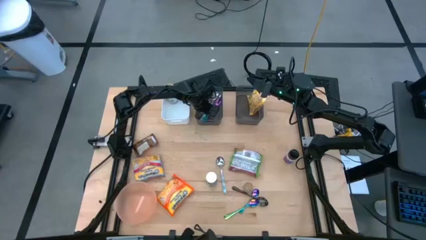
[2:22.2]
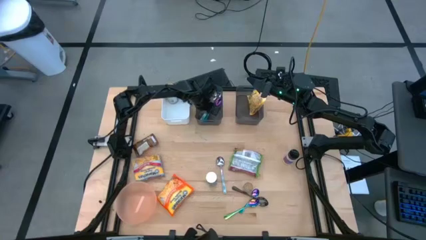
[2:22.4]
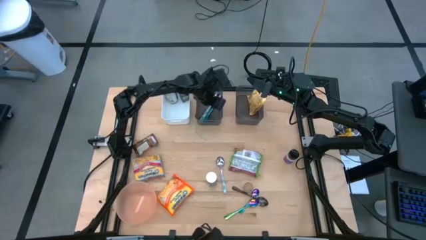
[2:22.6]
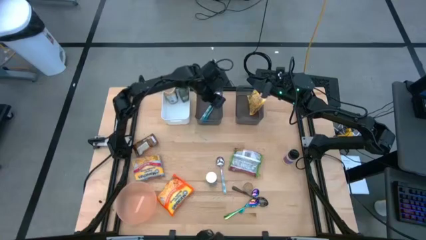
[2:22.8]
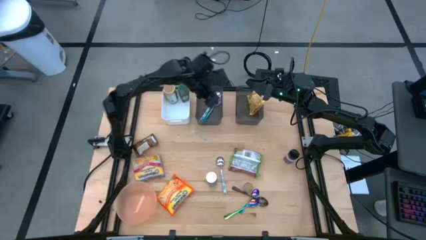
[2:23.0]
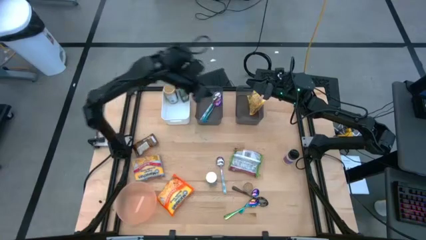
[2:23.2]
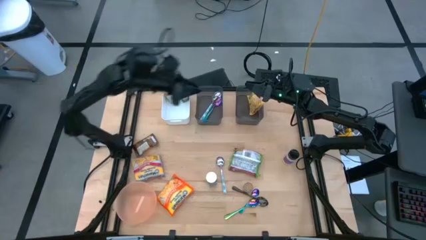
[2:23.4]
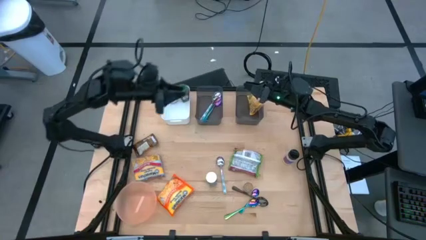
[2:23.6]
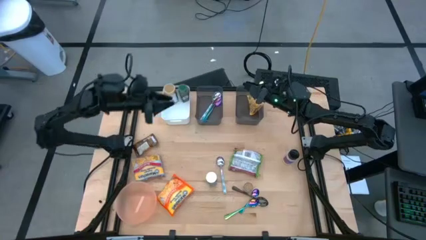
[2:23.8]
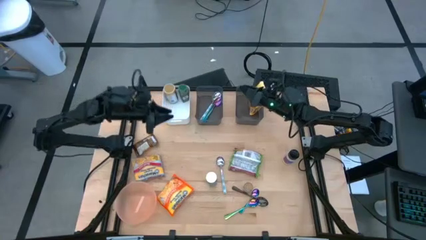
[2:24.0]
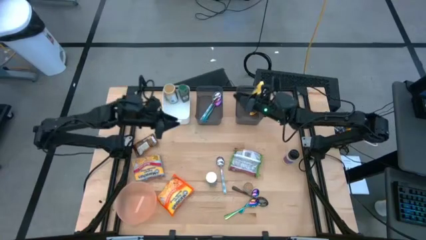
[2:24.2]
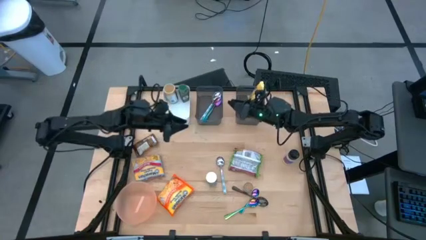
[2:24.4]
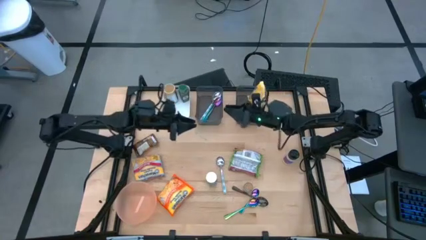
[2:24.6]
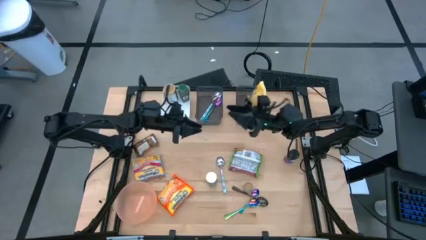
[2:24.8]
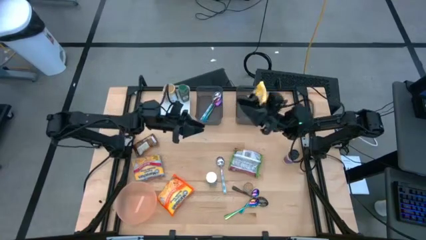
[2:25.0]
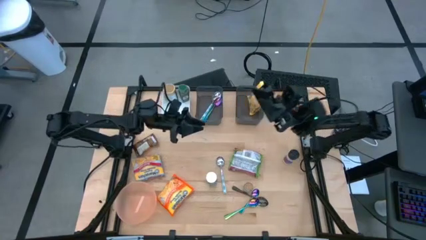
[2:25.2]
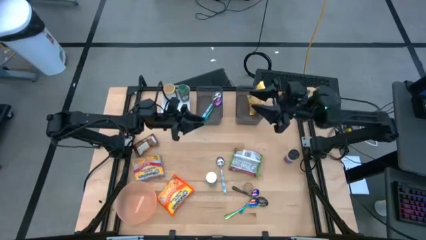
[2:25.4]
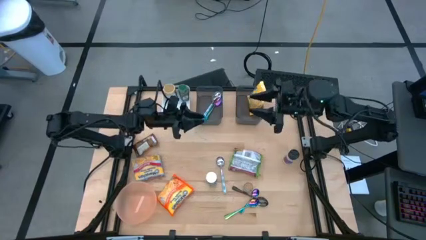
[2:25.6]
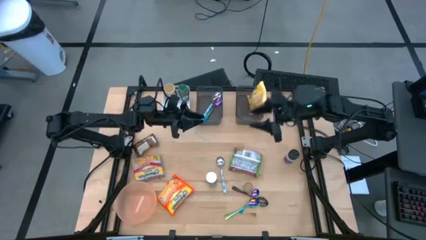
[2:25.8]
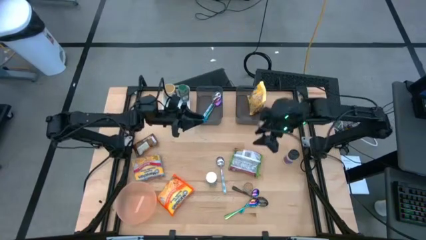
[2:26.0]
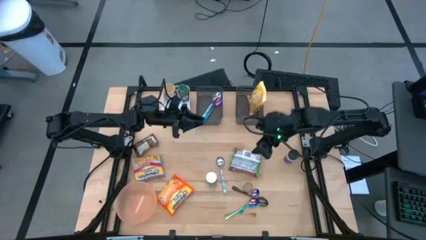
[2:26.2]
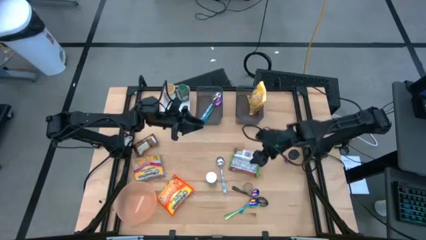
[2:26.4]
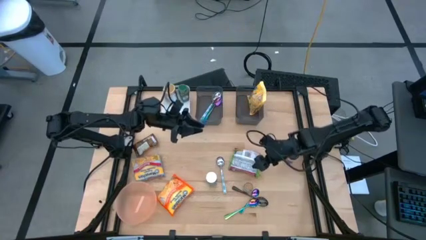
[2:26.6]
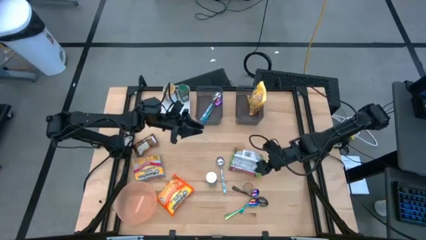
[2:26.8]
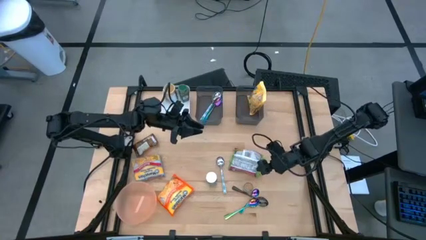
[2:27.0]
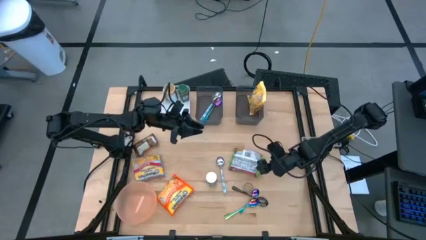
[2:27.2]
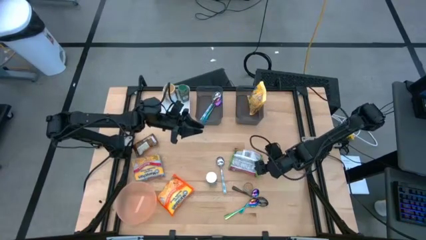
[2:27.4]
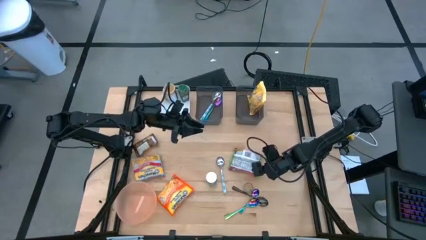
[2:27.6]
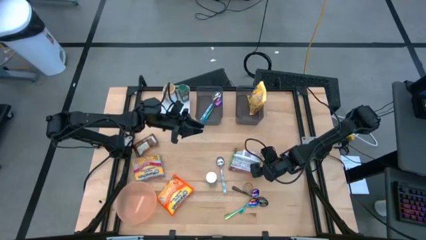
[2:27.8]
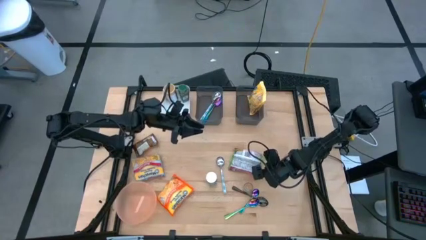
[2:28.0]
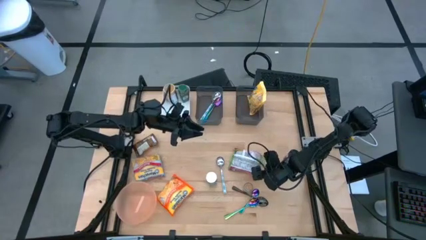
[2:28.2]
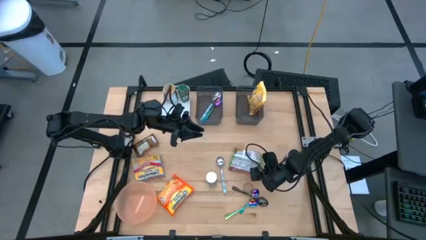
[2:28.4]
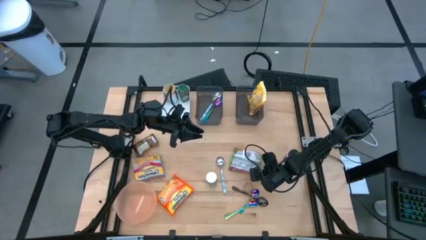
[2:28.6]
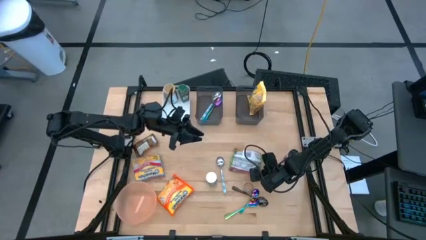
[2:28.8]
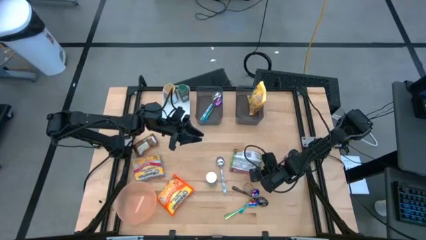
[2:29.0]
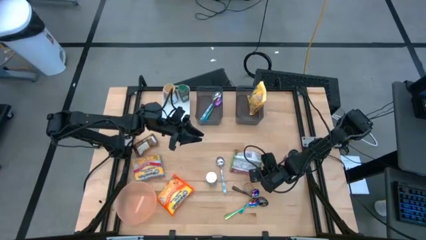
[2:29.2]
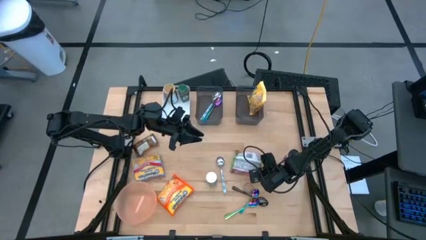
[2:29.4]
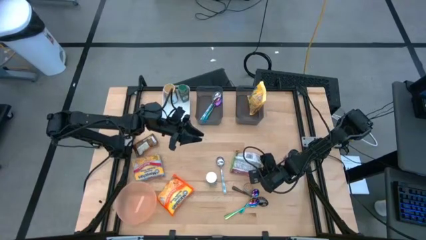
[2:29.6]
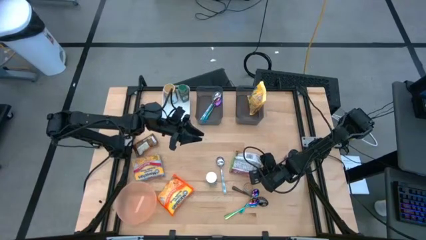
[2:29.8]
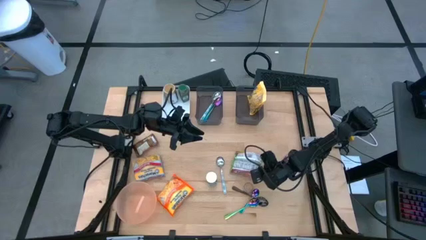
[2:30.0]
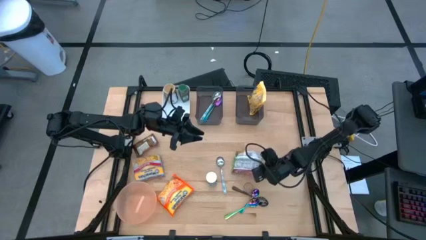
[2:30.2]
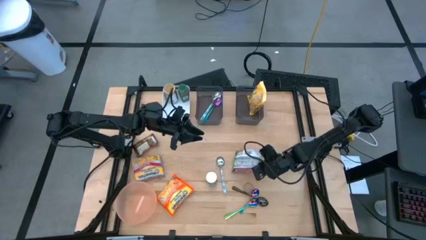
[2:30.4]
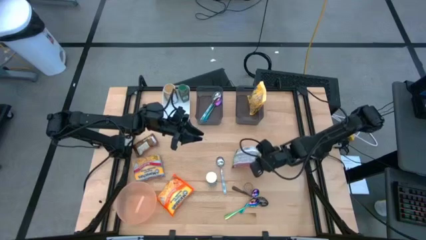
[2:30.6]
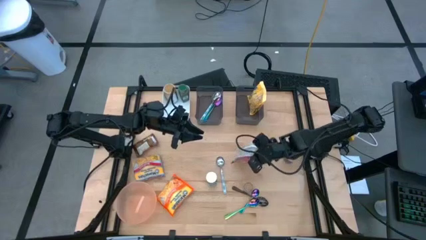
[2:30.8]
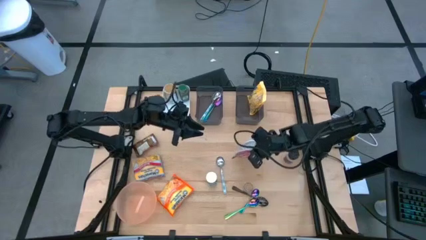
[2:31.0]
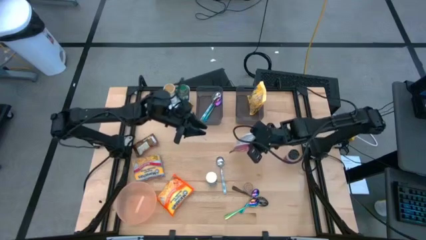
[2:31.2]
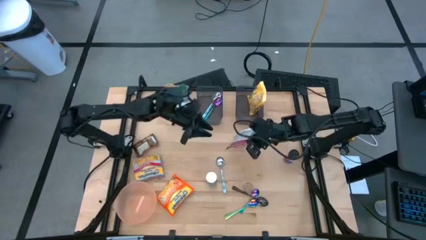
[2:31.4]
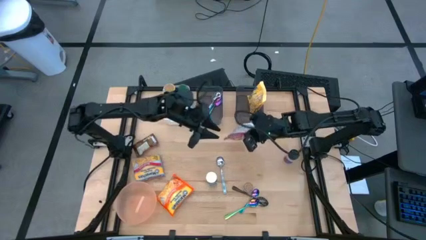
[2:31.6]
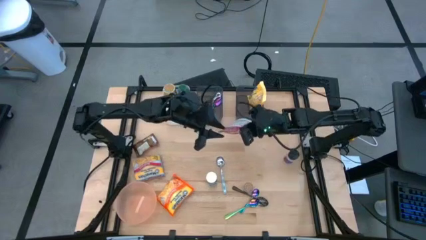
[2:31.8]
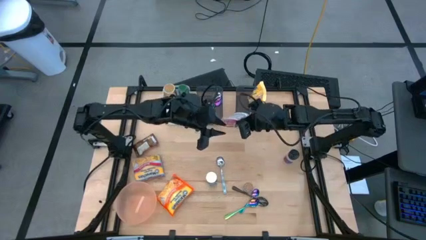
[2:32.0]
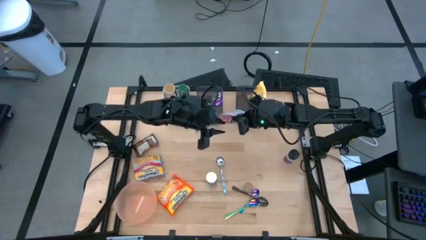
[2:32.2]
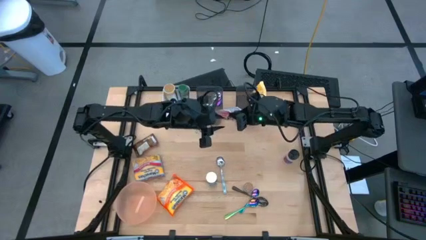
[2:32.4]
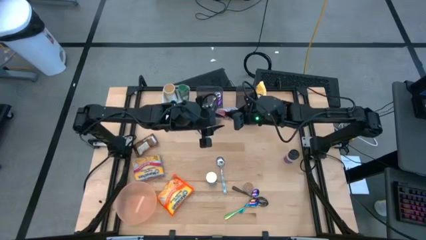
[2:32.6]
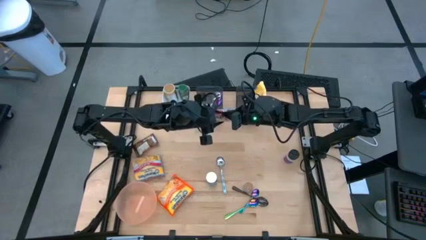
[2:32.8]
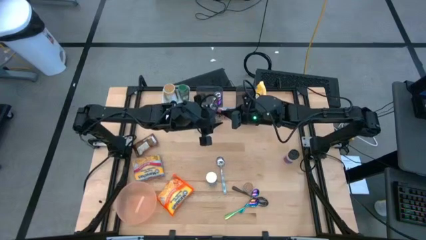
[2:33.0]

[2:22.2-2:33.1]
Task: Pick & Place Food Item
Put the green noodle pack into the right black bin

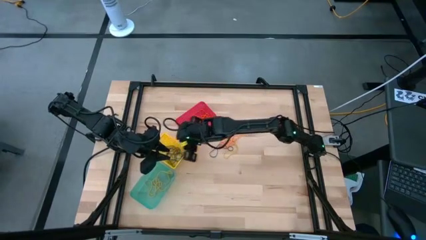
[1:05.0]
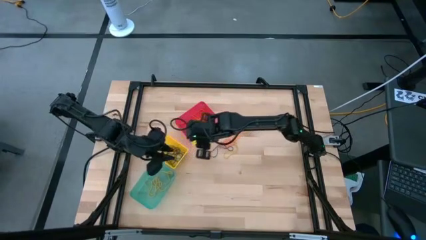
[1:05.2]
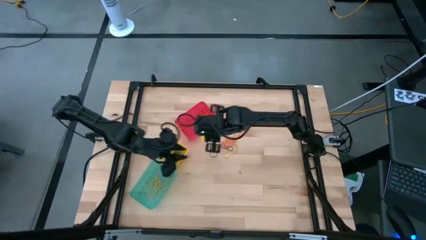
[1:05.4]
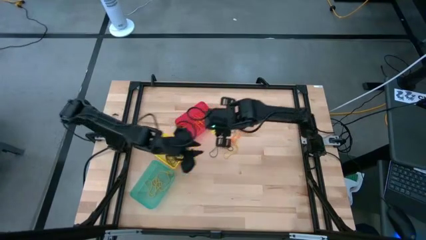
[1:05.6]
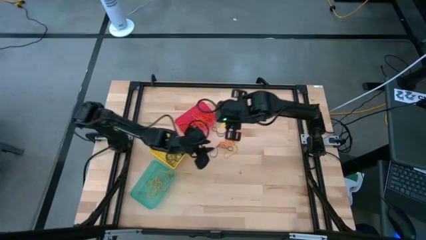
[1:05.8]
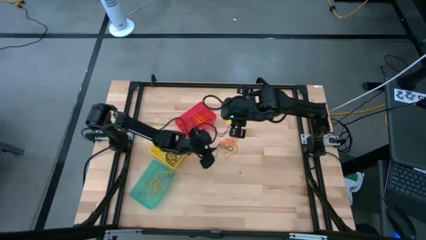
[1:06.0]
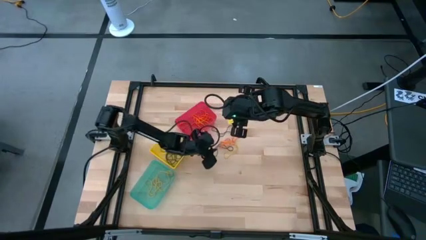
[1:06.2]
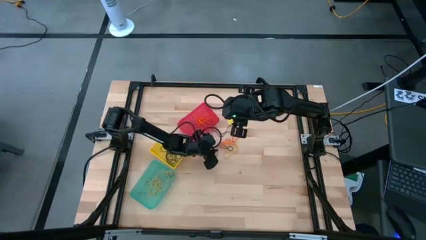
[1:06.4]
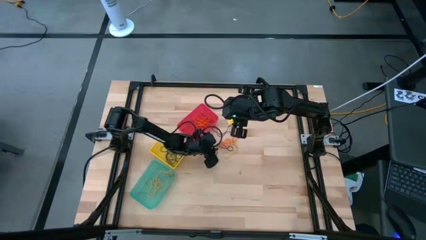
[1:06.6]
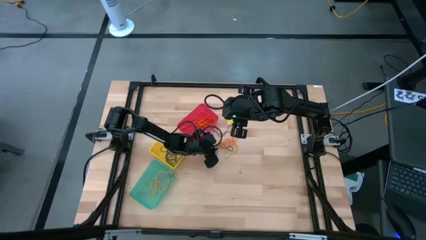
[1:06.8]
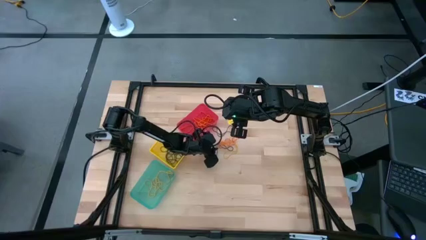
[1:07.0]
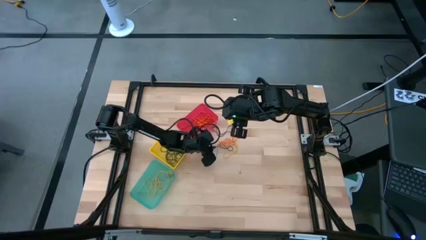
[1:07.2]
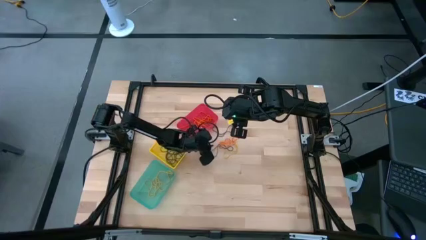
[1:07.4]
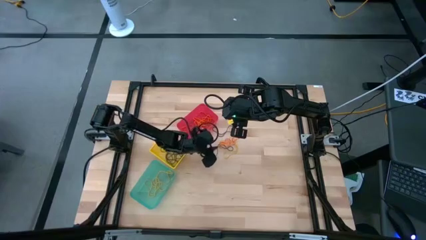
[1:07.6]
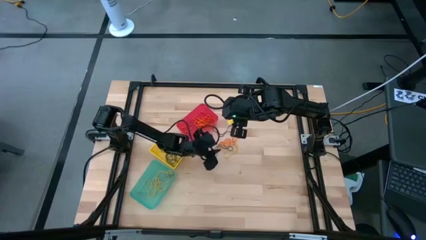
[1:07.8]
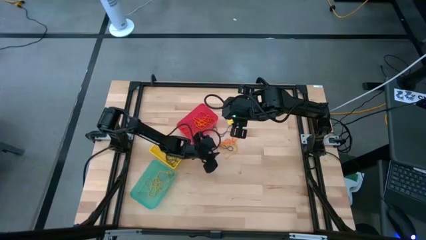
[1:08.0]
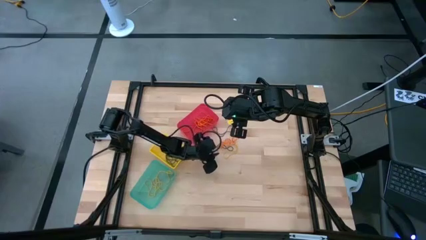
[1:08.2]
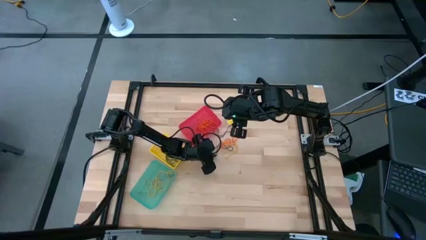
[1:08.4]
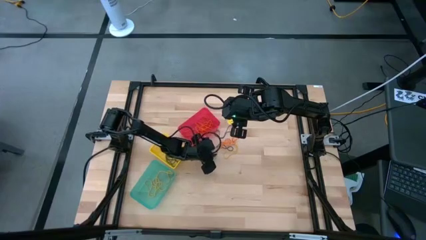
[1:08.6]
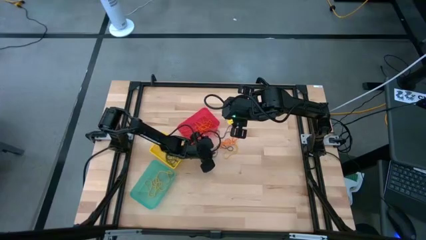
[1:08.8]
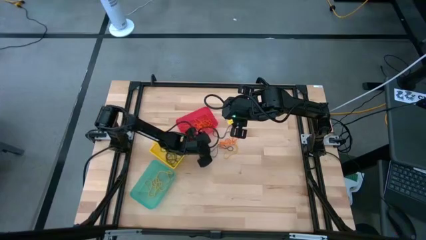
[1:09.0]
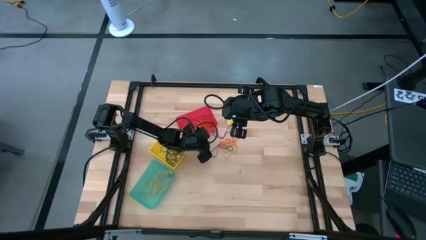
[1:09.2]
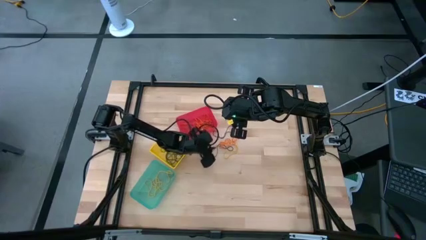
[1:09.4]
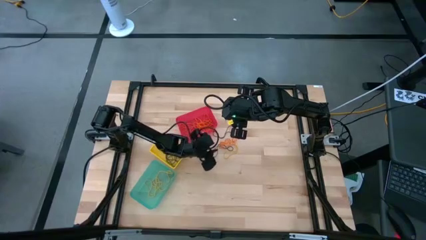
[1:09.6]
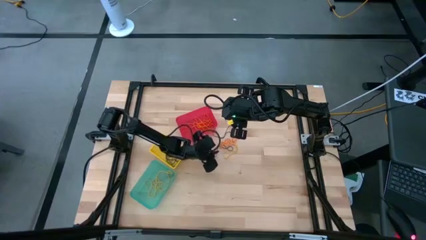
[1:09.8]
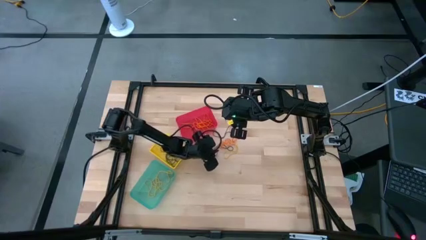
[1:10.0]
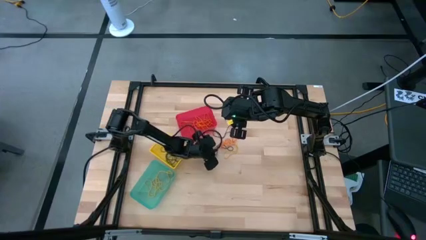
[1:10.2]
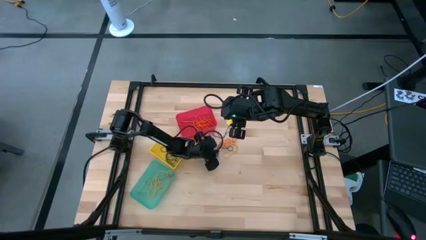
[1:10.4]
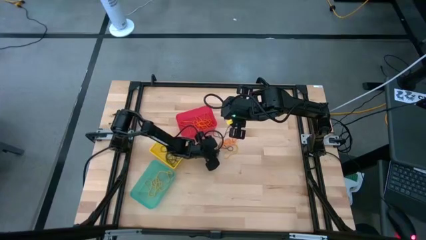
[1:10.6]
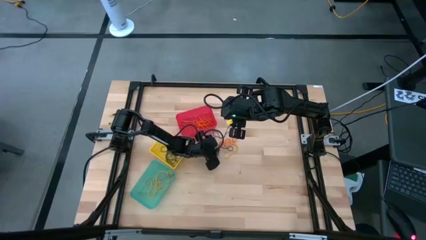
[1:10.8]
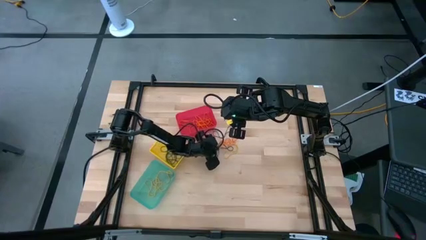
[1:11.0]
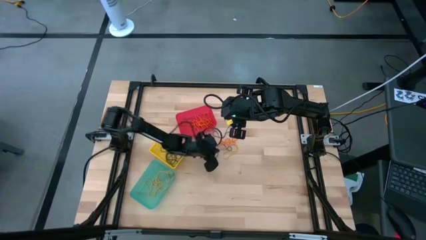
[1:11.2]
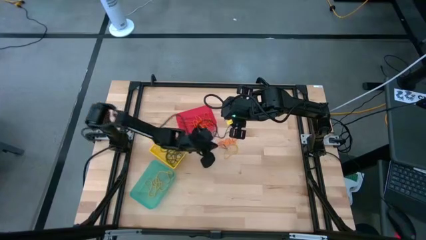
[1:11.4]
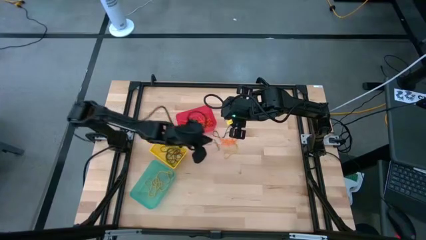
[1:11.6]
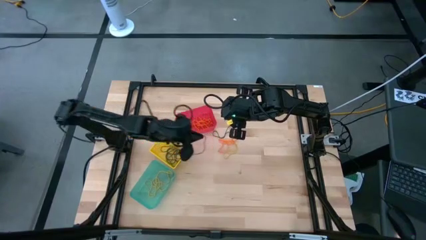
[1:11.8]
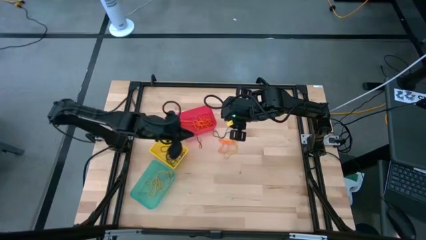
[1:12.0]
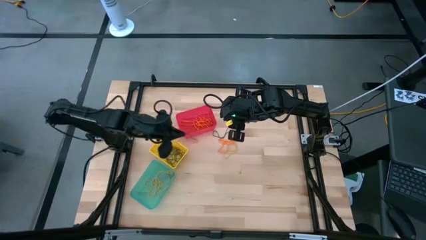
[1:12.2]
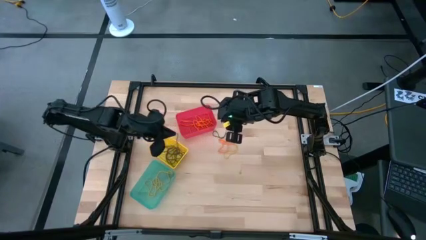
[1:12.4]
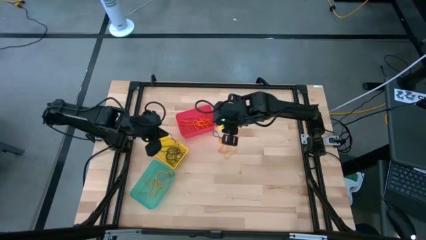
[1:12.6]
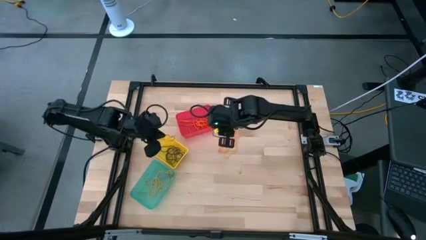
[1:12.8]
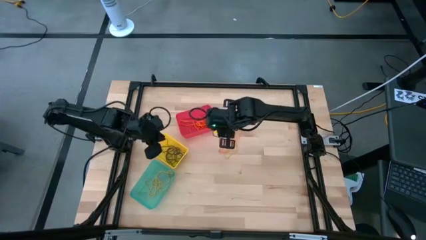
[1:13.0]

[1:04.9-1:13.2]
Task: Sort rubber bands into baskets
Put the black rubber band into the yellow bin
